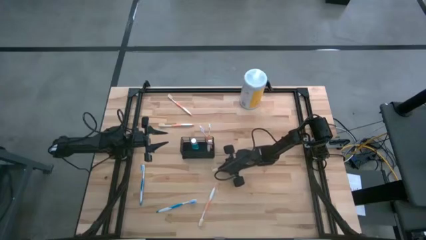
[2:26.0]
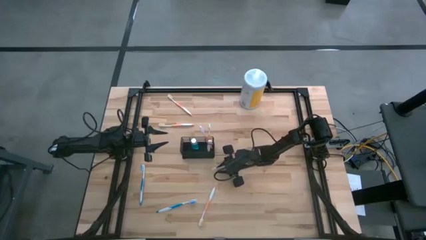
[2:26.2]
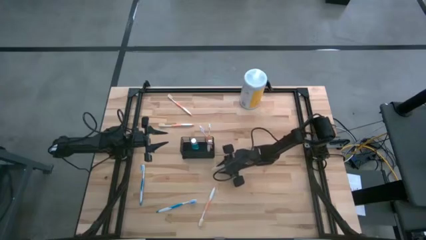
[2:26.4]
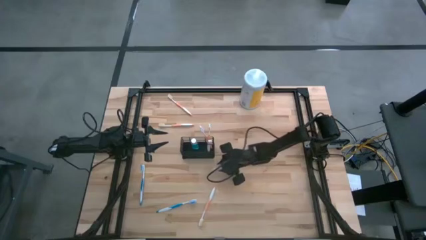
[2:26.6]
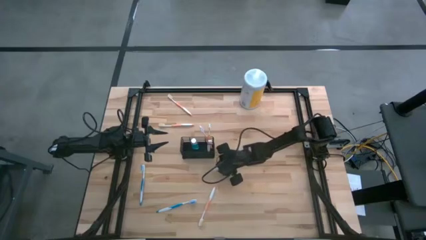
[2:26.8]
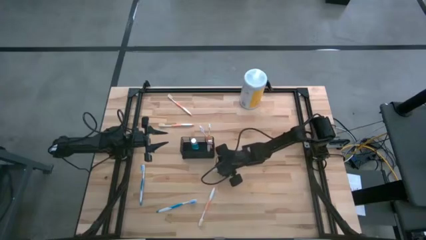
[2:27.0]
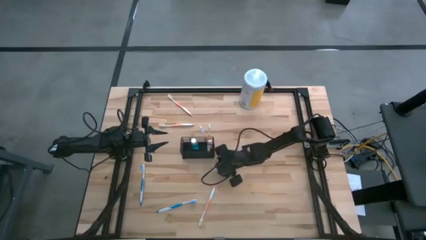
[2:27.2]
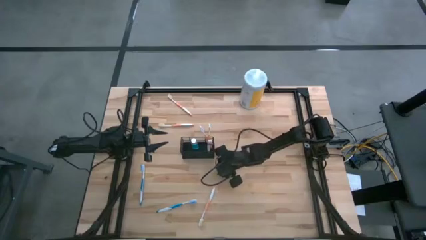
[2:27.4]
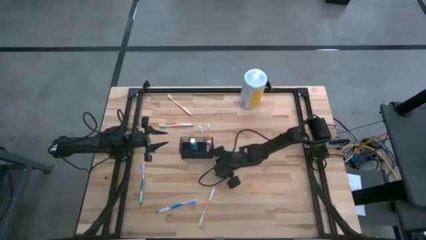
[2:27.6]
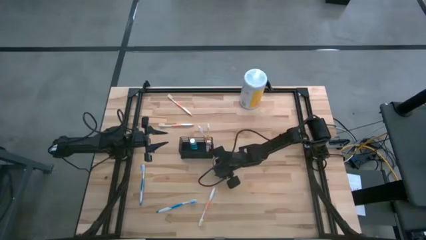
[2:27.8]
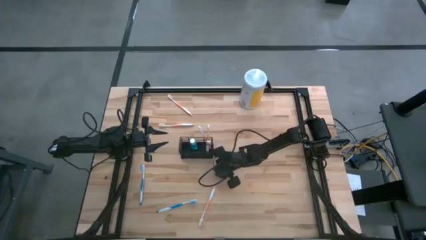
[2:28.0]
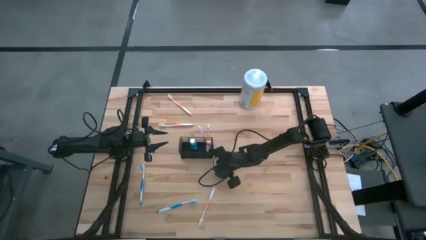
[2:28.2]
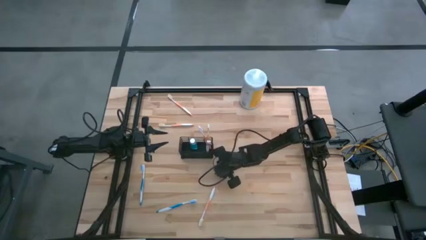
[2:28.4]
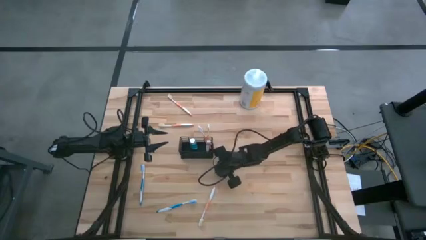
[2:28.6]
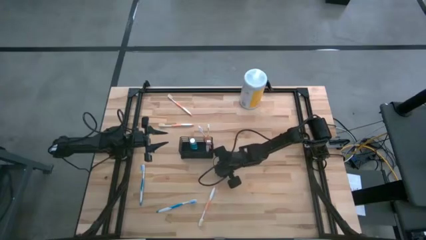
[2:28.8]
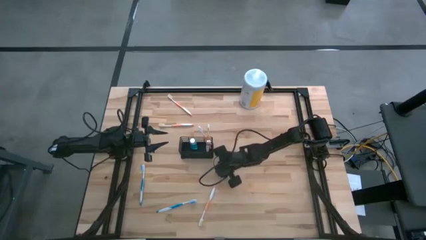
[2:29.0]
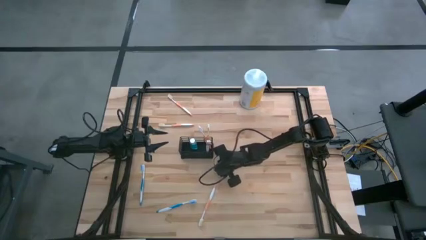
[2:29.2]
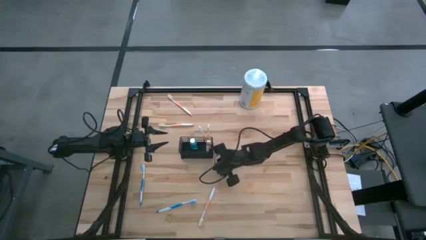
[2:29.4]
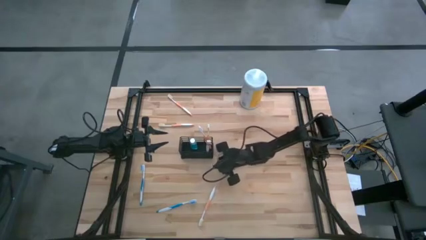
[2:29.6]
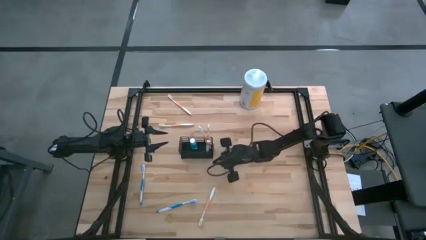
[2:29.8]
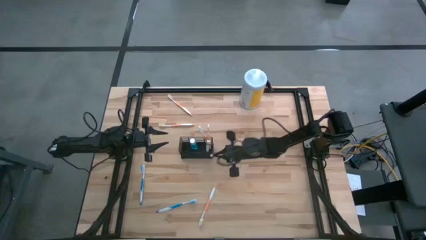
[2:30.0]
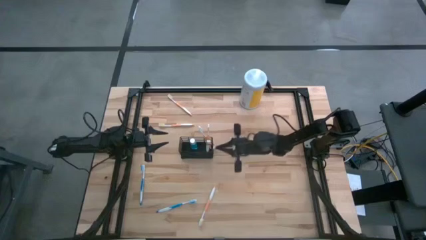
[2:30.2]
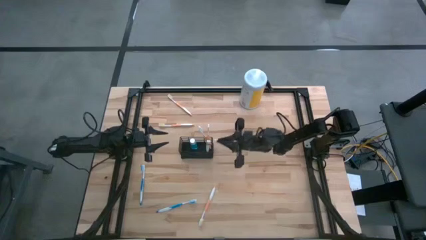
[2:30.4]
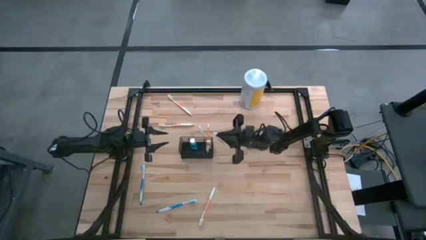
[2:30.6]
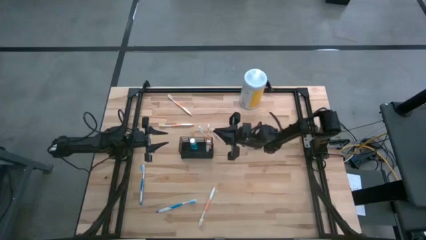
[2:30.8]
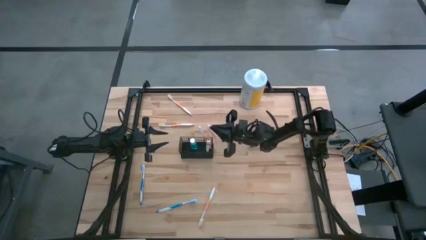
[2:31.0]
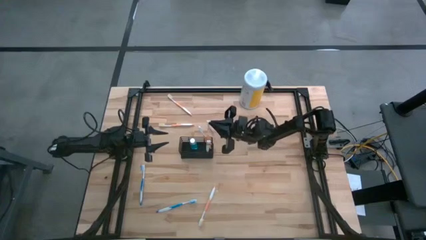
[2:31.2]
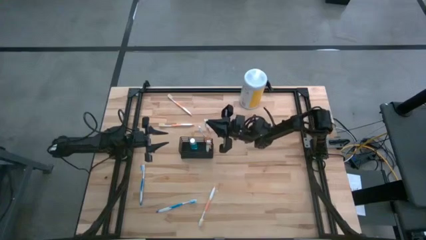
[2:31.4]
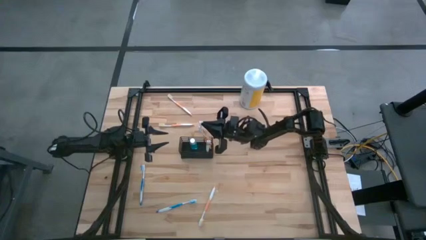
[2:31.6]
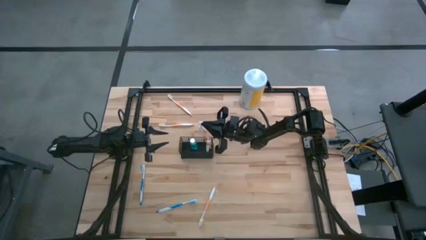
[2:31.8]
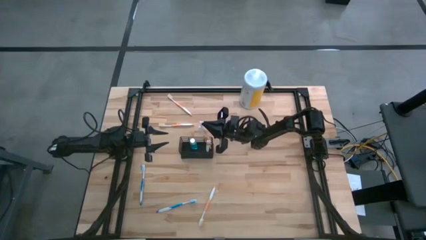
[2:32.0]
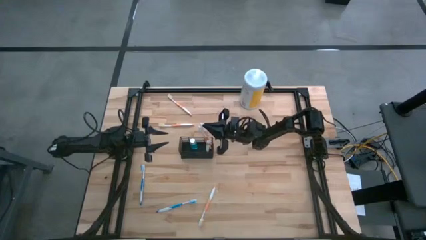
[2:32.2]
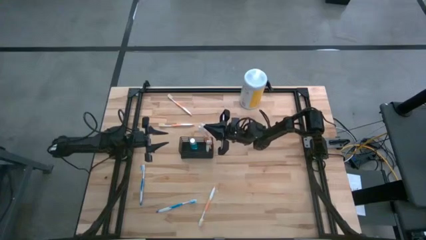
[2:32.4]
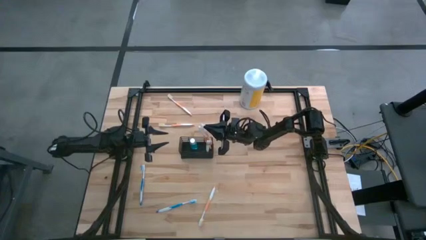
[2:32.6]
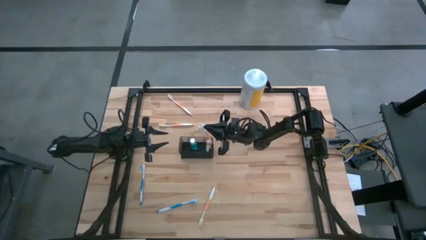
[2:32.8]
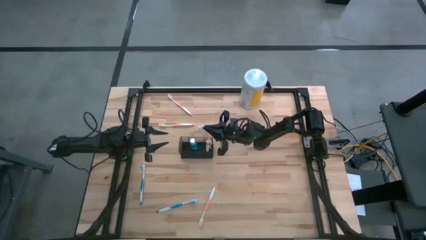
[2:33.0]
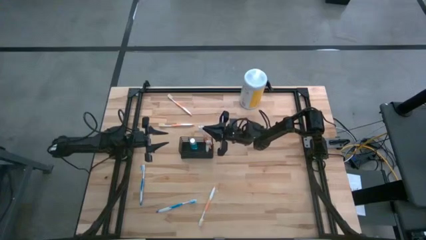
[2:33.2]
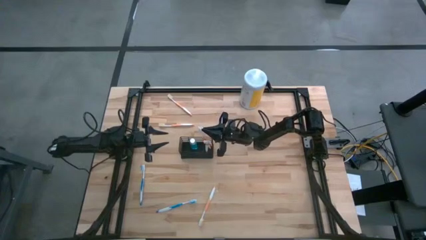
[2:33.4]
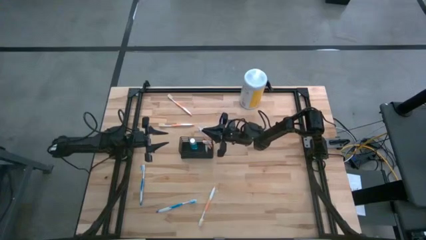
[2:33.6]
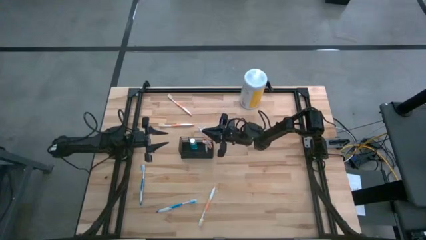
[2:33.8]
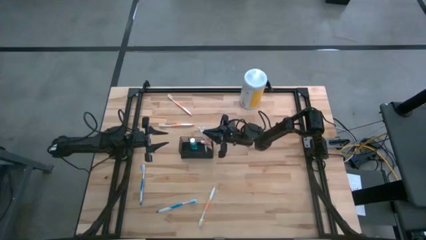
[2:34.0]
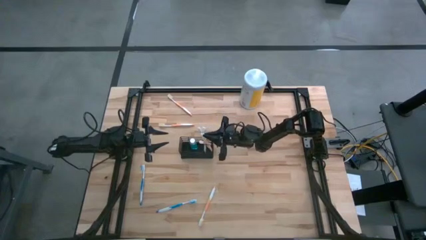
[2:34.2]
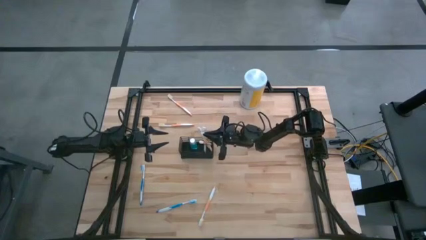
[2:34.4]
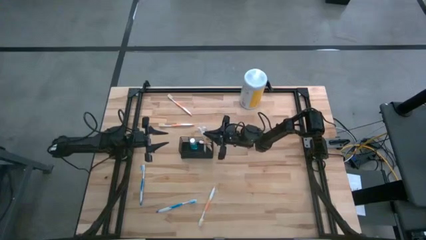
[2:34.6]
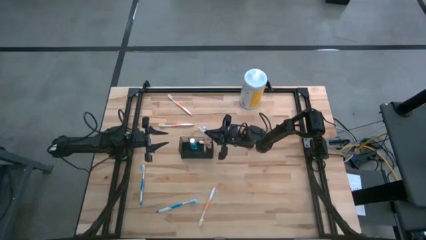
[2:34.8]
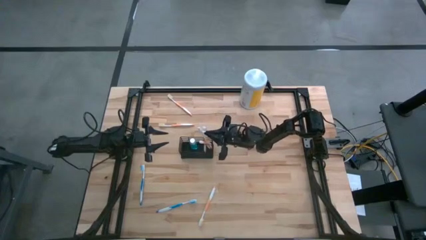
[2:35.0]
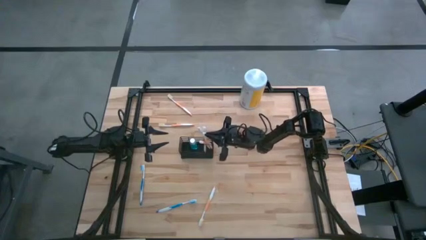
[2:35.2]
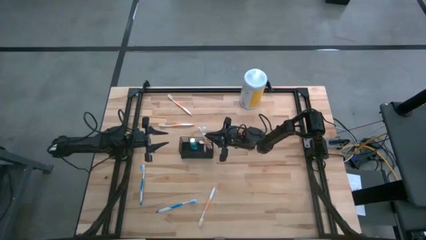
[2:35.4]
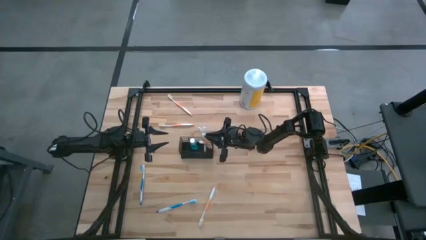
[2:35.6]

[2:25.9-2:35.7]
Task: Pick & Place toothbrushing station
Put the orange toothbrush into the right section of the wire organizer

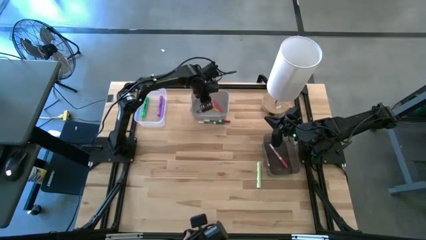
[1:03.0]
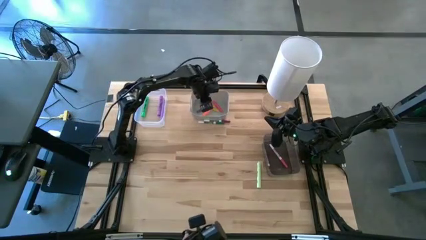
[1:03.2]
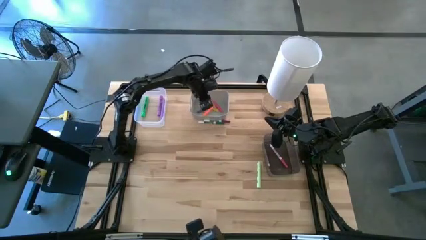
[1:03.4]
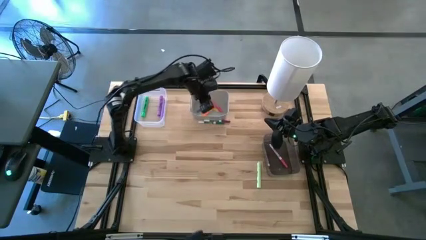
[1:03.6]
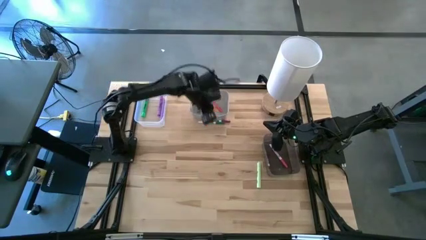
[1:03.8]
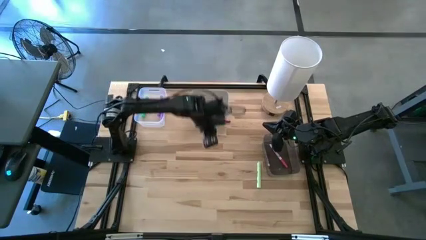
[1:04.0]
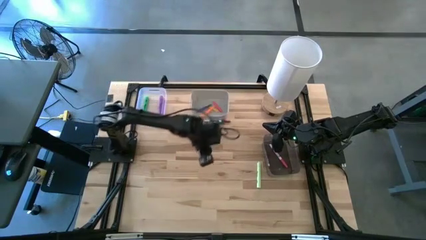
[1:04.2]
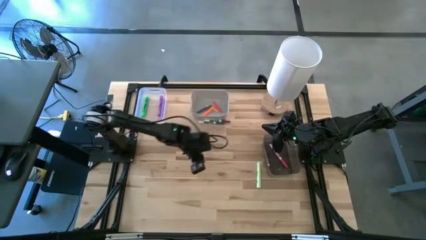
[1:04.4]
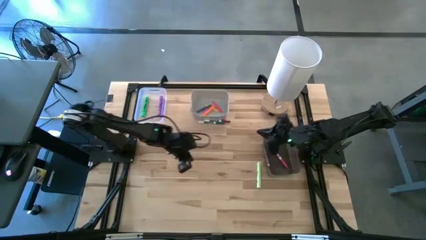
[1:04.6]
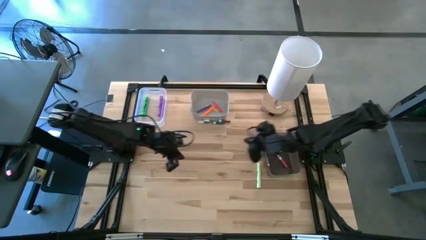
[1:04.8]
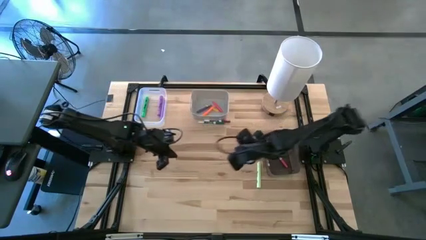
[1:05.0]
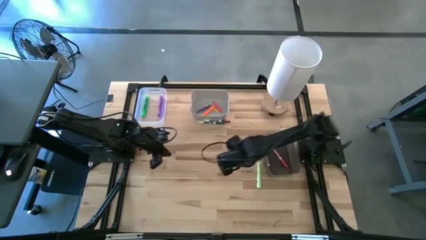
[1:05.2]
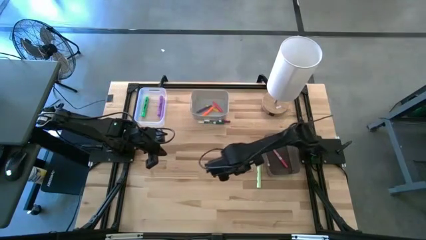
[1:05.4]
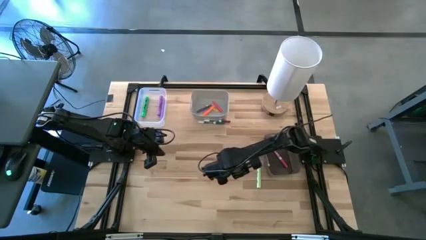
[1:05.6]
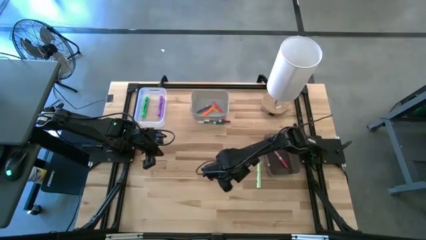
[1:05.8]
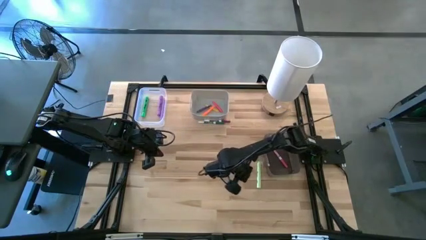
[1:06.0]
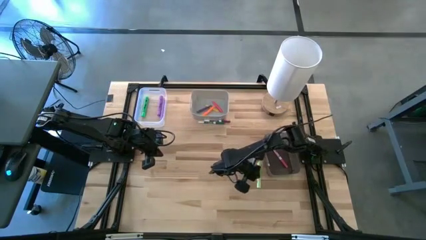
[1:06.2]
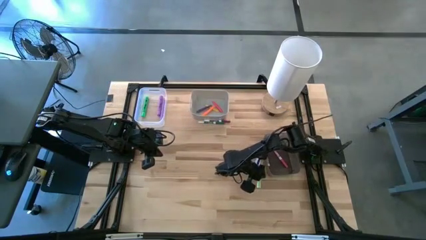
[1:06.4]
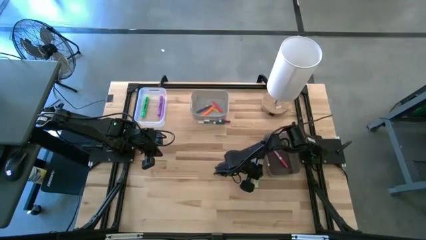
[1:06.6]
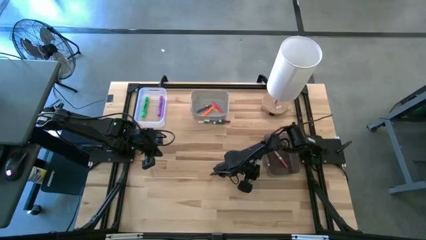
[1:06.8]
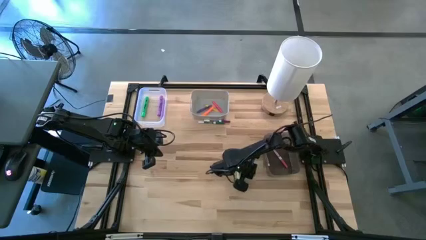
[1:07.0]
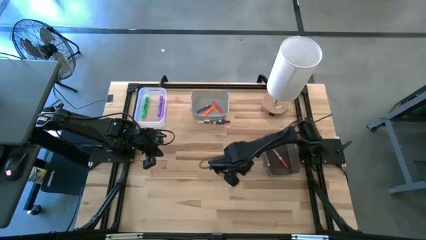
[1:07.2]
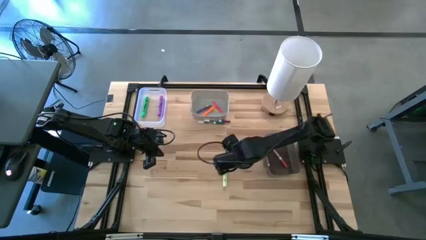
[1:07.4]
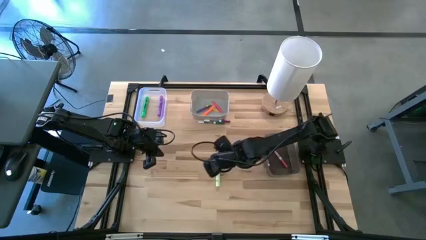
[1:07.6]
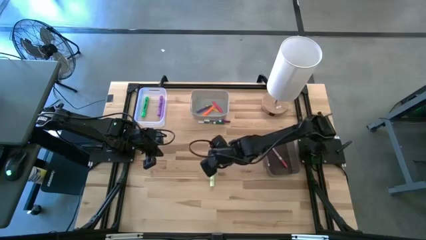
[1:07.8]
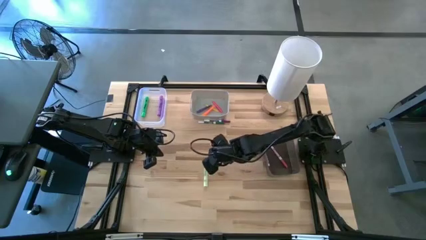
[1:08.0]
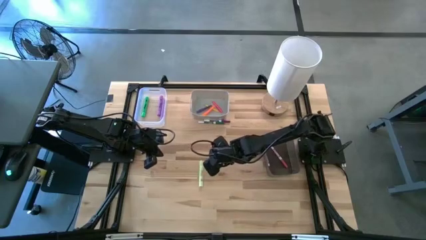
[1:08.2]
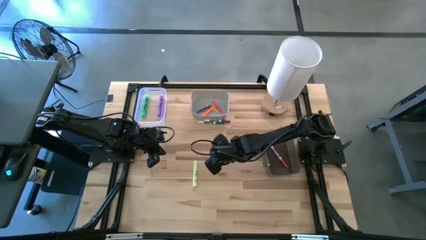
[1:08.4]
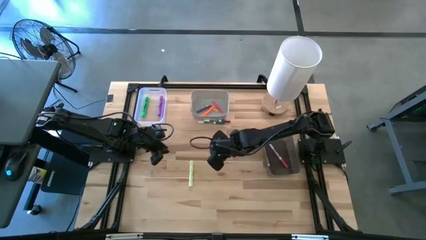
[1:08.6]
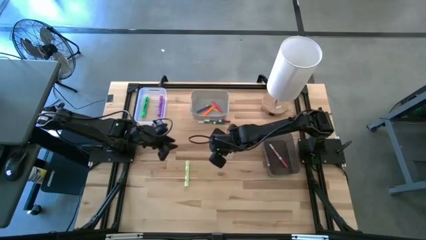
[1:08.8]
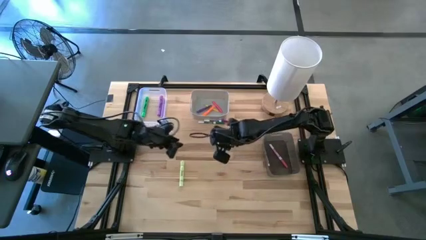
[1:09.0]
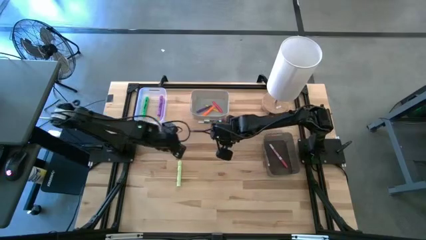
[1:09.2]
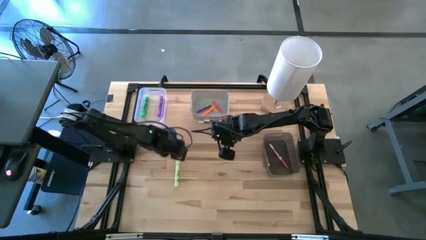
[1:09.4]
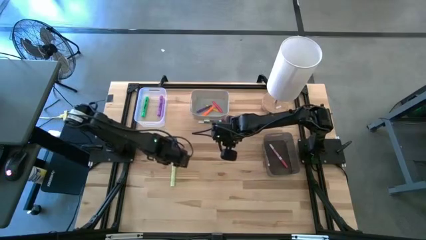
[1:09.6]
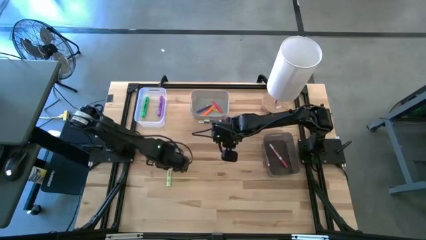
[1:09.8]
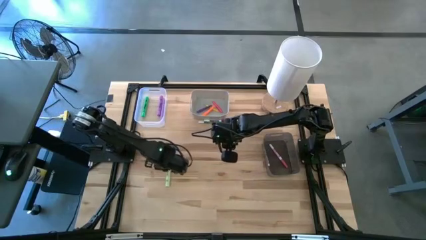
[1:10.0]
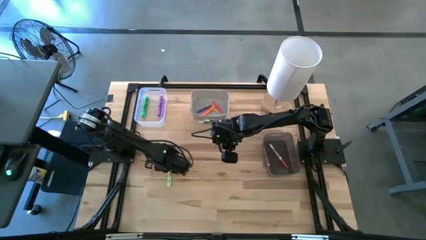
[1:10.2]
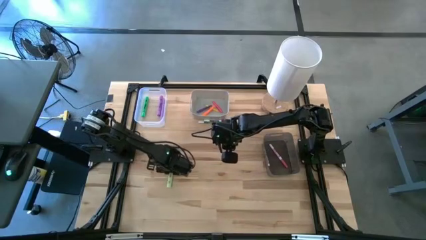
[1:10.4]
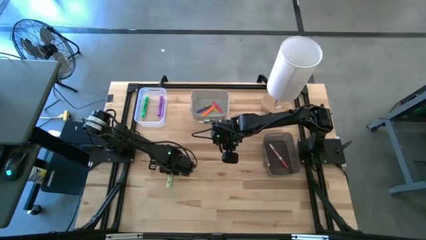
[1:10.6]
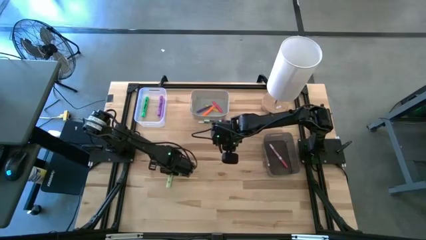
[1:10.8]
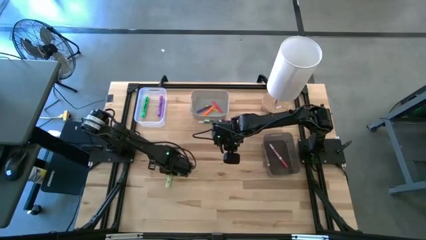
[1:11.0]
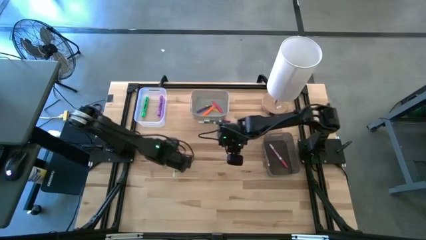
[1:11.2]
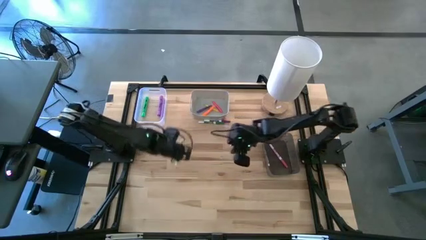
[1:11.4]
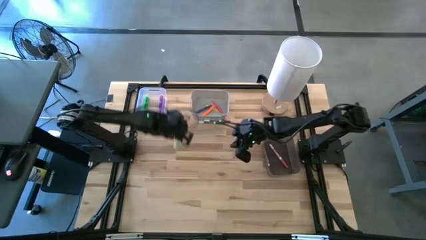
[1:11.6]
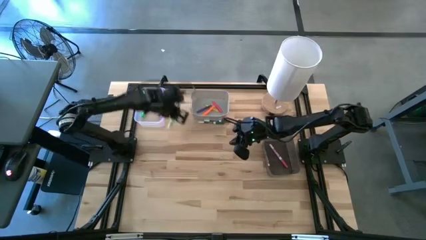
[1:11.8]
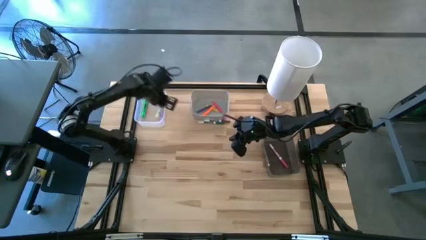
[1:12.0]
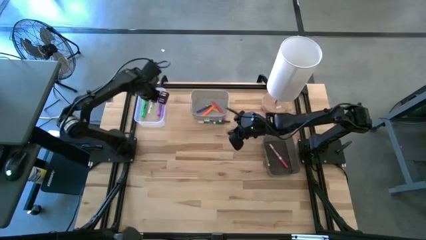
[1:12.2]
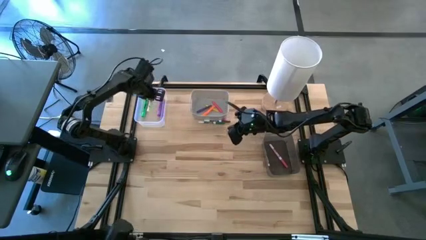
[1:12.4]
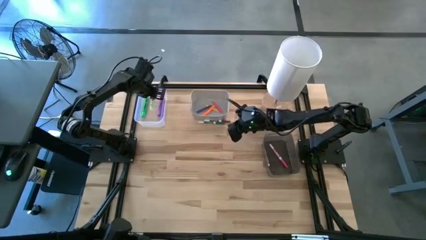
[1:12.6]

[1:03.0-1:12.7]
Task: Pick & Place Markers
Put the light green highlighter into the transparent bin
